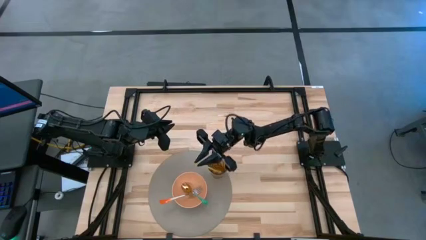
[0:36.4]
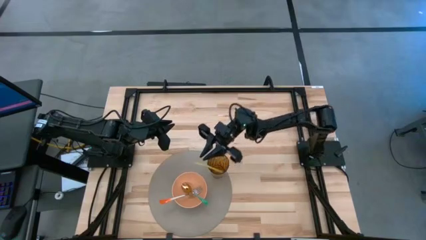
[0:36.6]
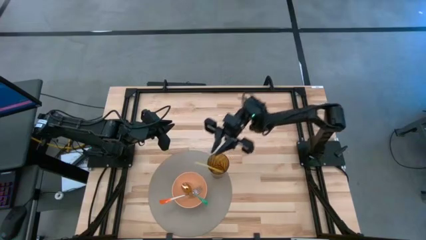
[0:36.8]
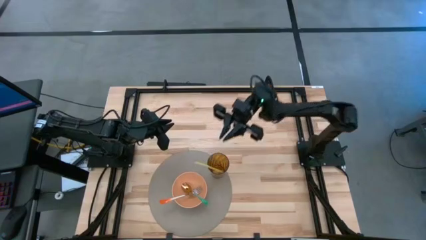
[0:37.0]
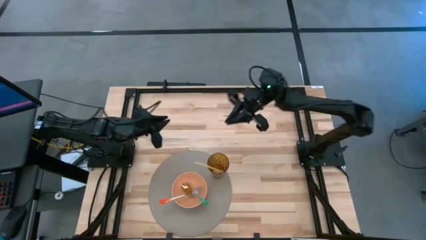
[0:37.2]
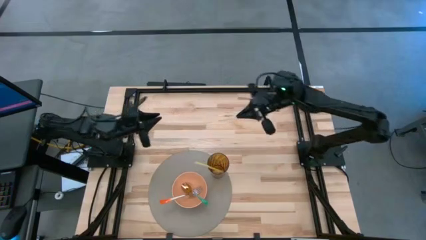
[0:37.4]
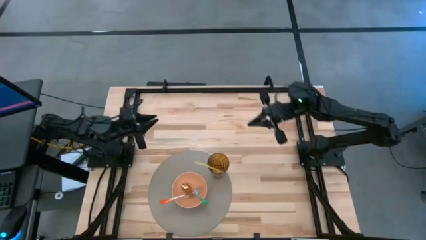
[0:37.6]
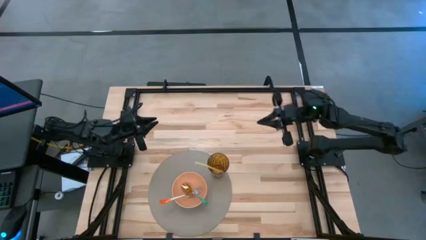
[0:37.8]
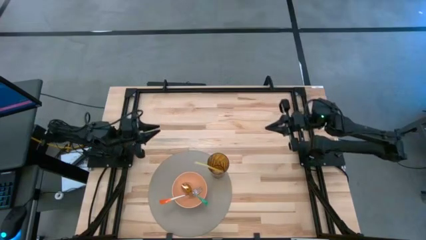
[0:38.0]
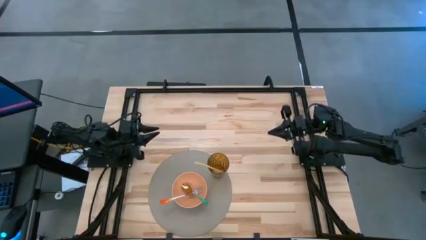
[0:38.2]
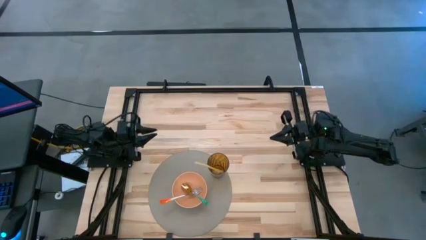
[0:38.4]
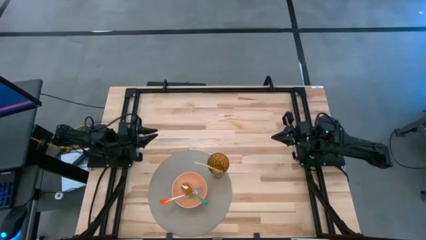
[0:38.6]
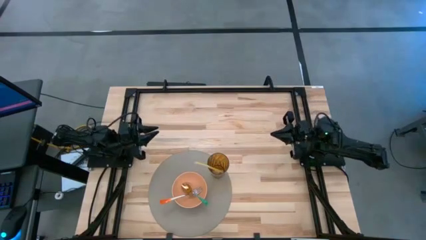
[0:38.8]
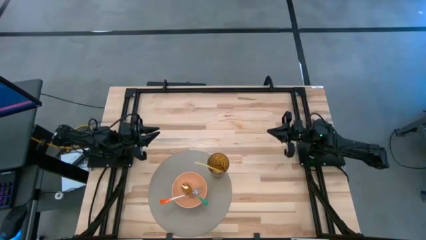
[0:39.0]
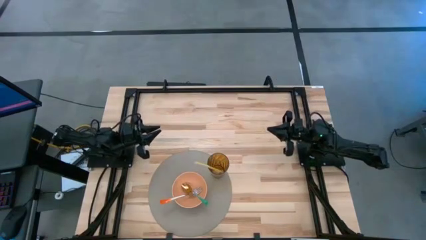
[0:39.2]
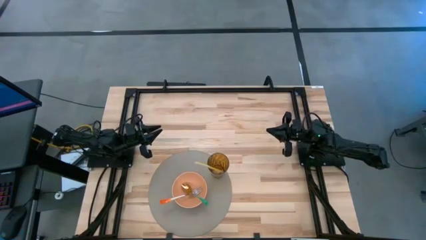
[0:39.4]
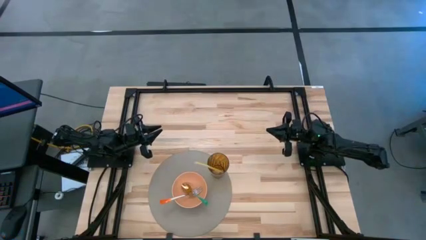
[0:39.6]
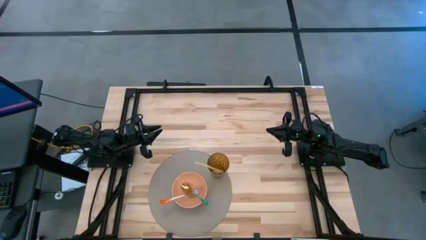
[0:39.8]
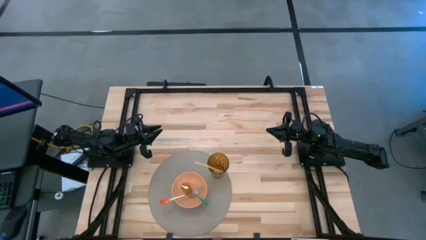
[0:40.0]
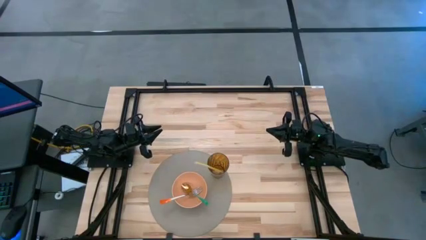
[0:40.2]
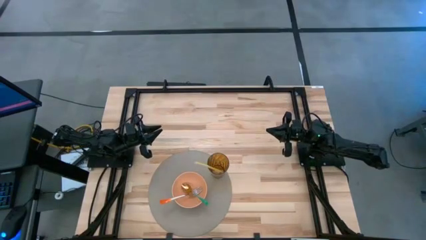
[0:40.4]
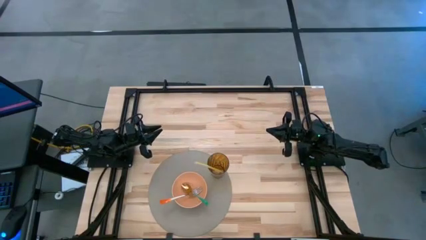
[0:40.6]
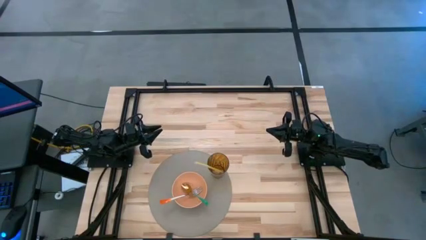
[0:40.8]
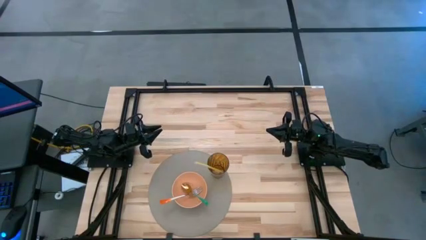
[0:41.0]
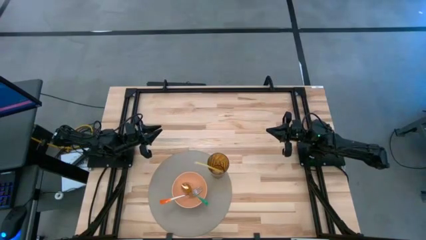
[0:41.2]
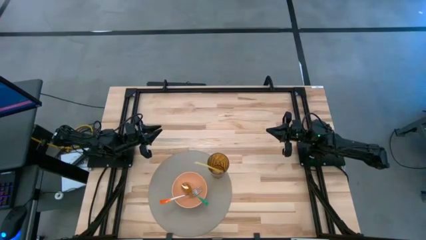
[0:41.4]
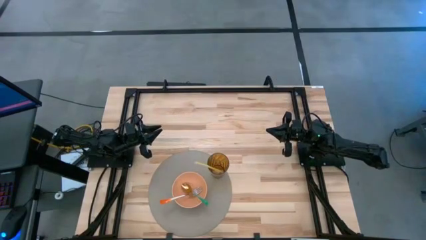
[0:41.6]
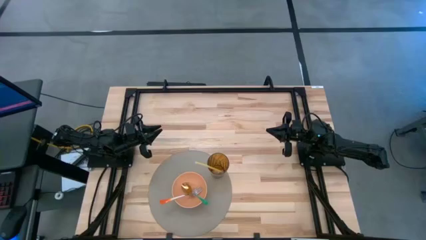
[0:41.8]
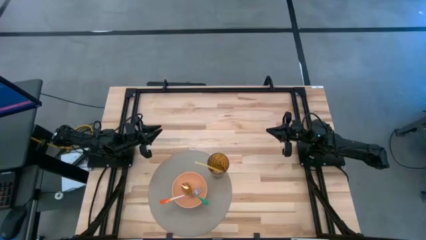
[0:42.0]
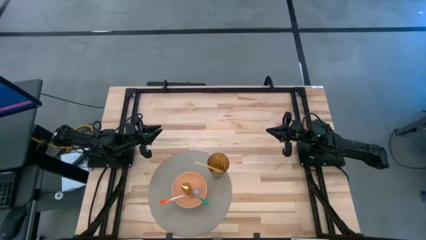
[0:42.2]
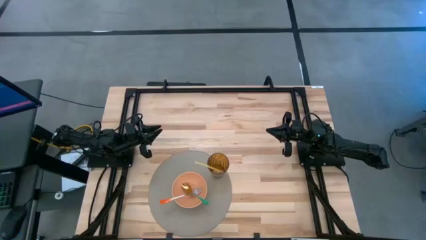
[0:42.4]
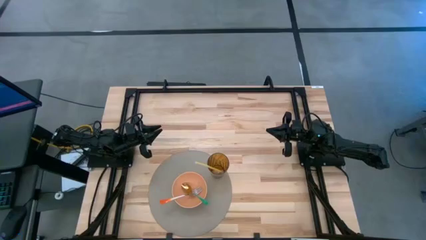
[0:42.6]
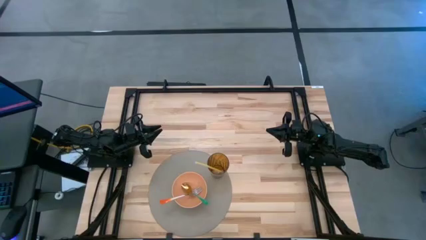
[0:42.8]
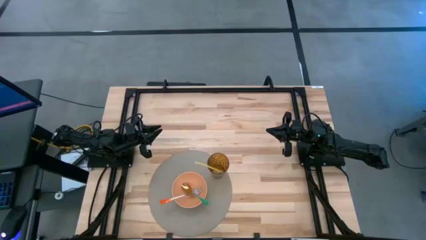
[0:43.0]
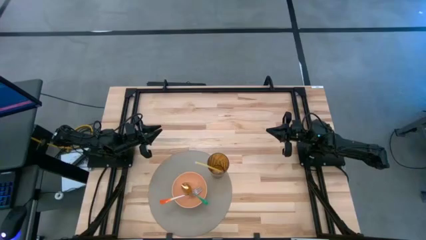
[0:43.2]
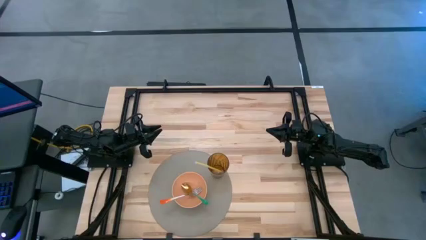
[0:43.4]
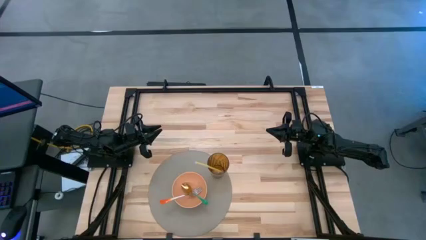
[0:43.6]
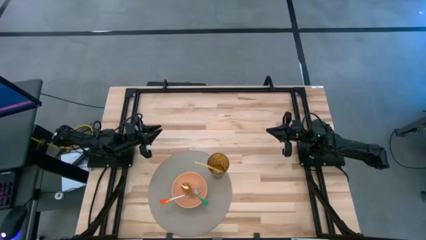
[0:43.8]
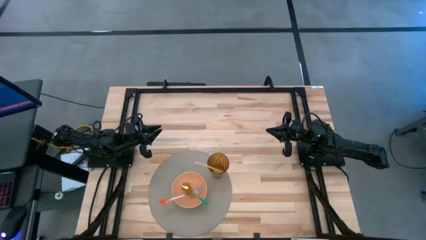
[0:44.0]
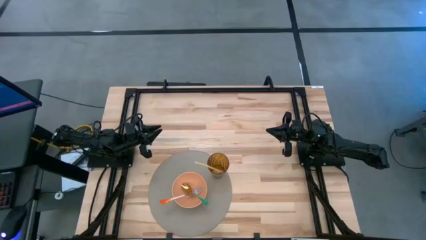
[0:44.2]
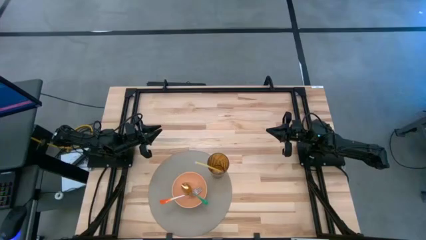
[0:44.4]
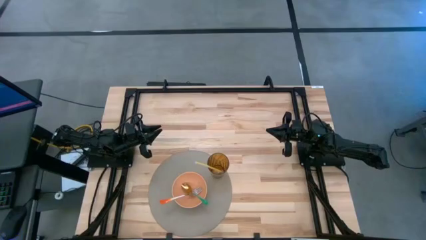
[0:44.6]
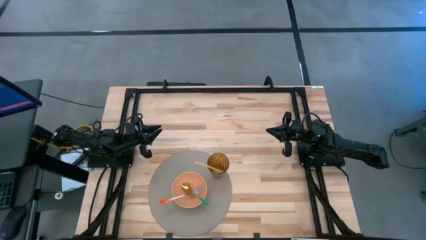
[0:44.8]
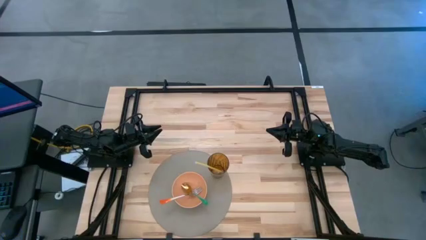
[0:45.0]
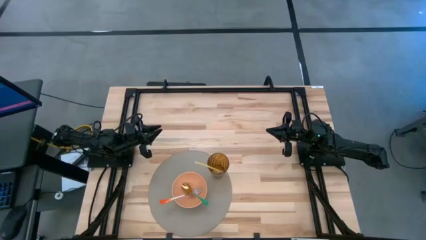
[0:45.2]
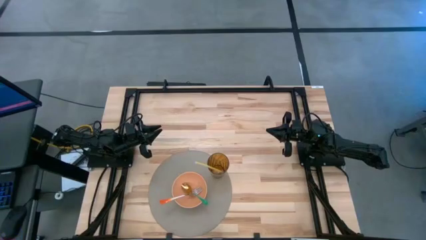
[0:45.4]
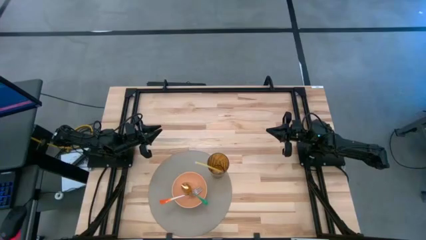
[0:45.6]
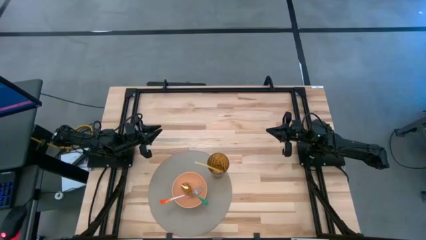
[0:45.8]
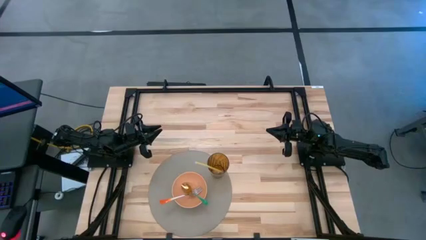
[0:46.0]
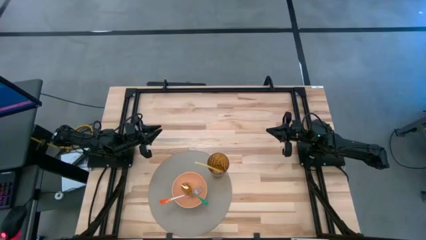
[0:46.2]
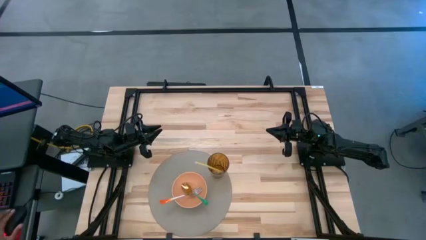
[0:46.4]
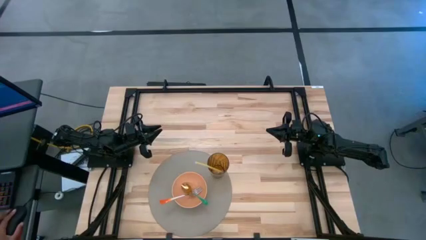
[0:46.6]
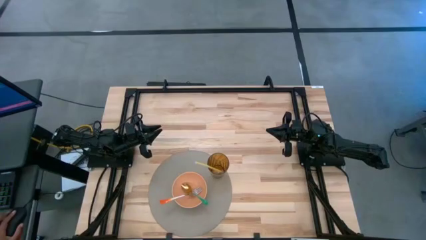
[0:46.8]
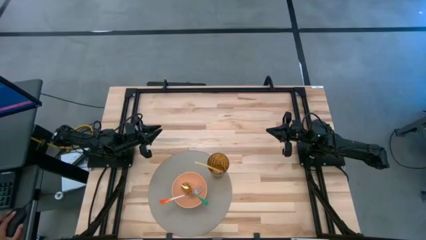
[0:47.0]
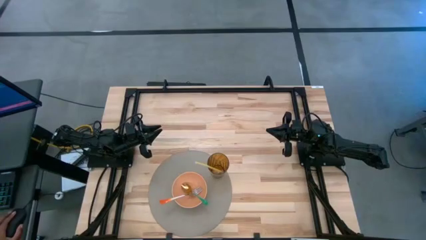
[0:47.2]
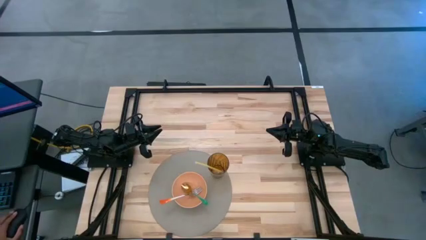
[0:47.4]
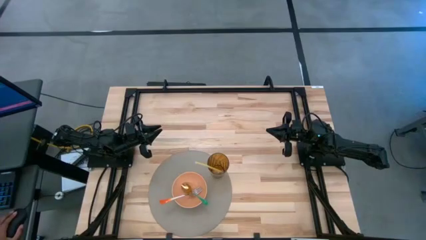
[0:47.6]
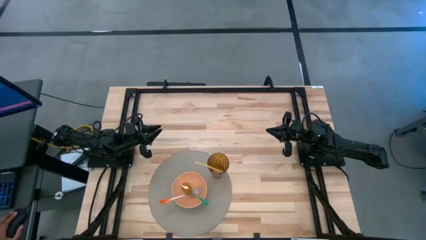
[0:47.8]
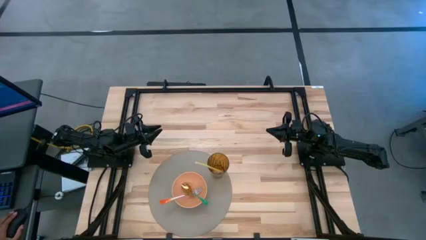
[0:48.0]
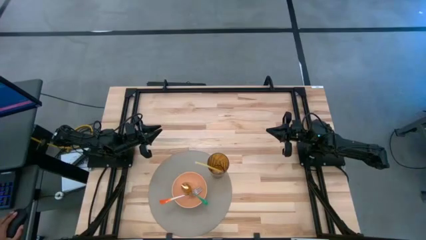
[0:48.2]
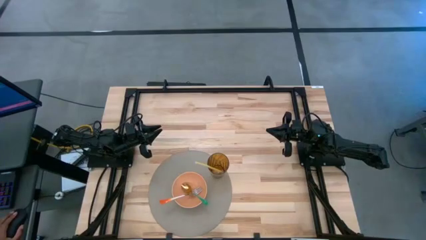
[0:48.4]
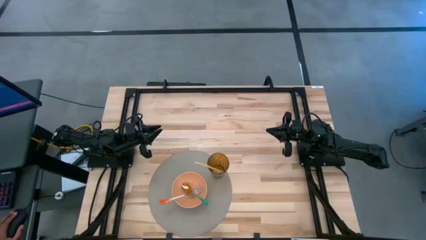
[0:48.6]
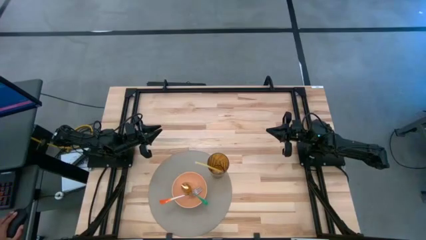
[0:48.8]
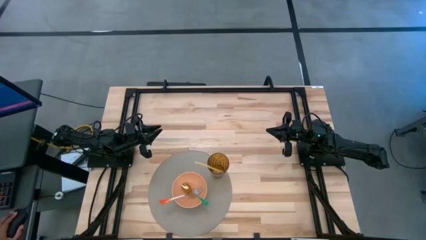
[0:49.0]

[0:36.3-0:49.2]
Task: Pick & Place Utensil
Return to Home Position
